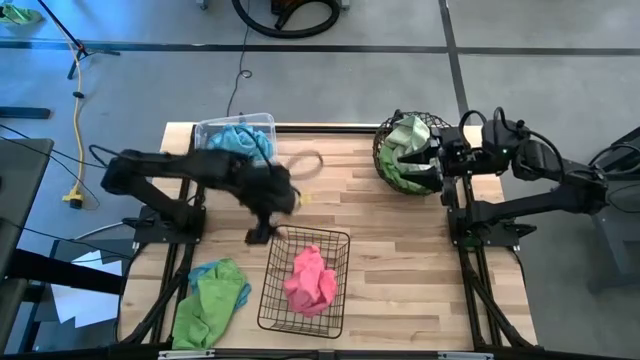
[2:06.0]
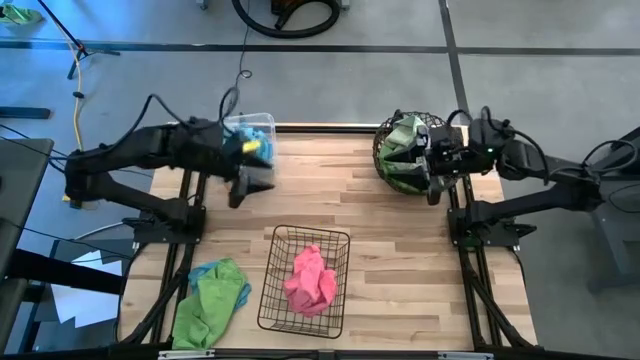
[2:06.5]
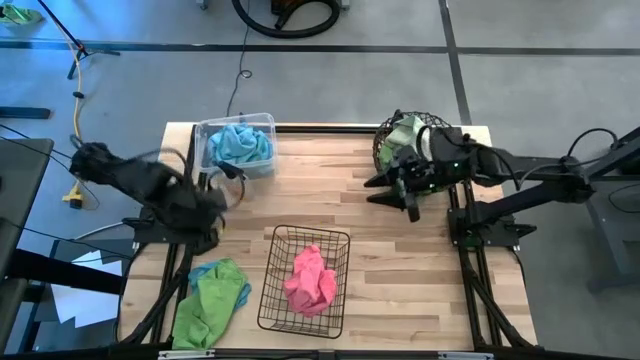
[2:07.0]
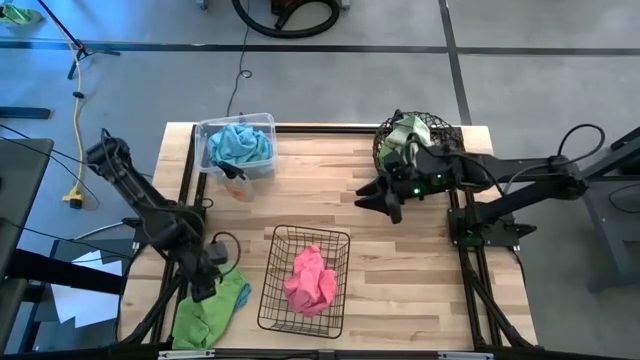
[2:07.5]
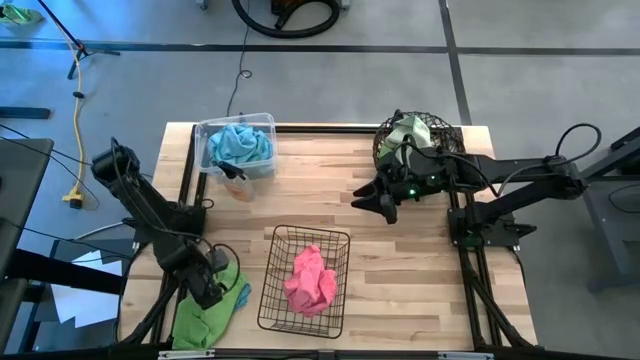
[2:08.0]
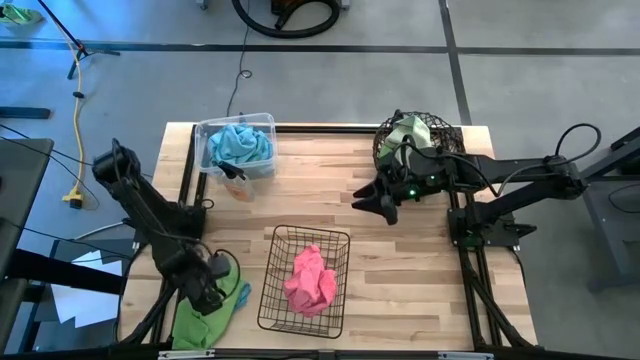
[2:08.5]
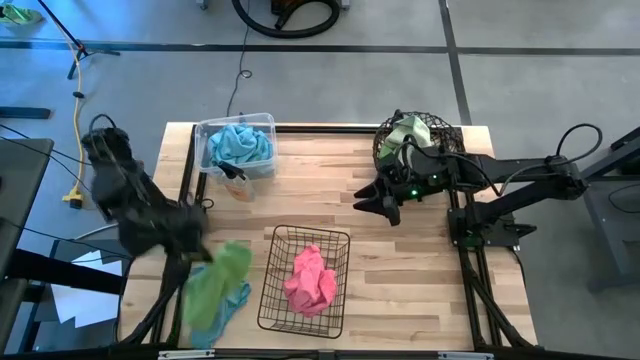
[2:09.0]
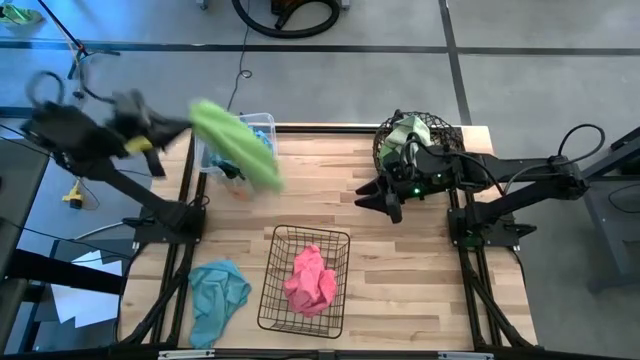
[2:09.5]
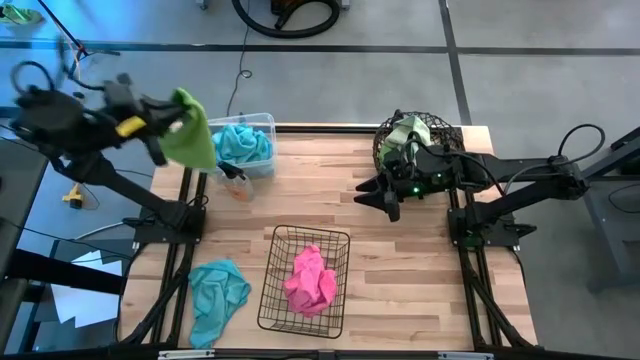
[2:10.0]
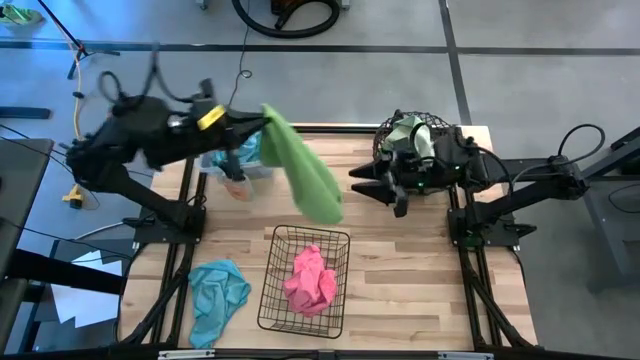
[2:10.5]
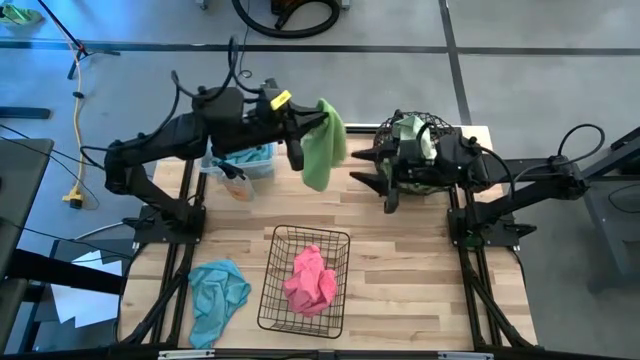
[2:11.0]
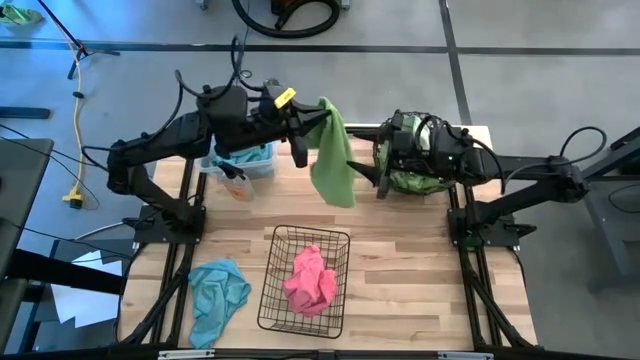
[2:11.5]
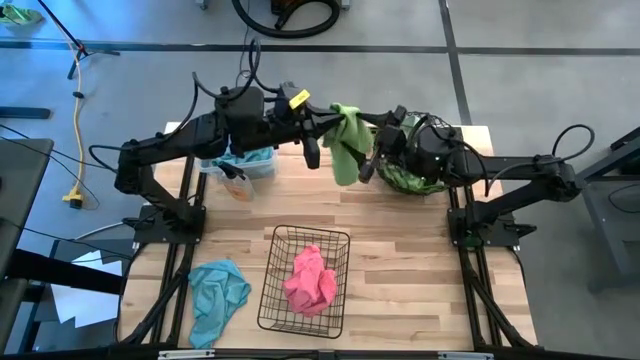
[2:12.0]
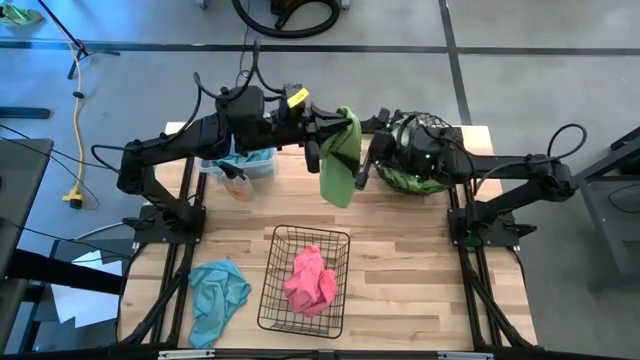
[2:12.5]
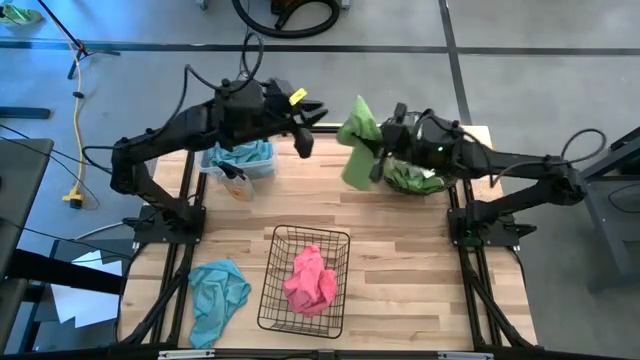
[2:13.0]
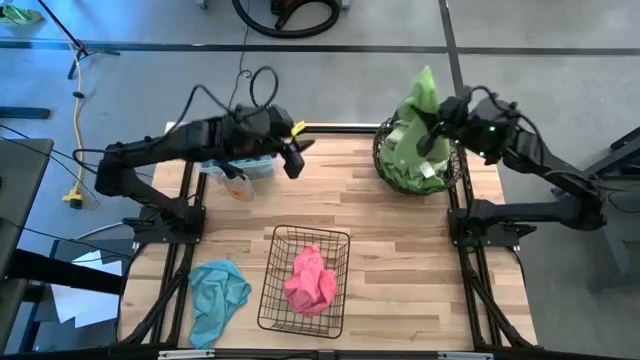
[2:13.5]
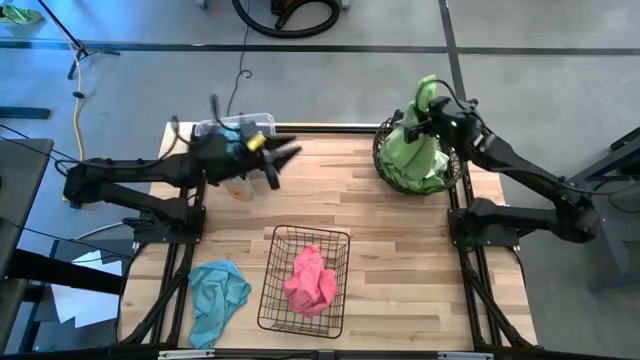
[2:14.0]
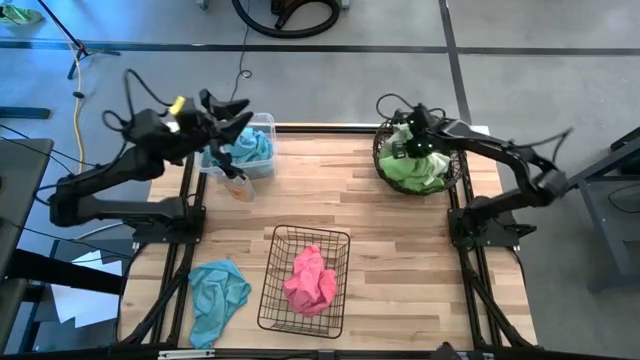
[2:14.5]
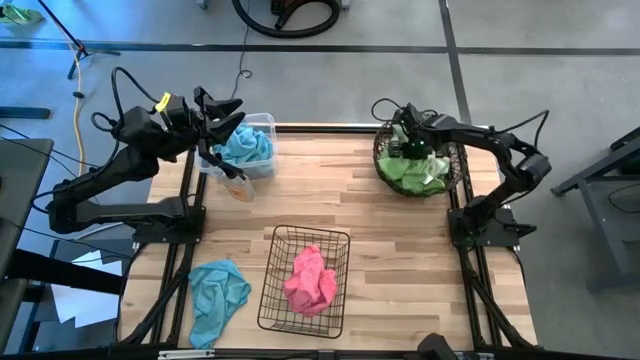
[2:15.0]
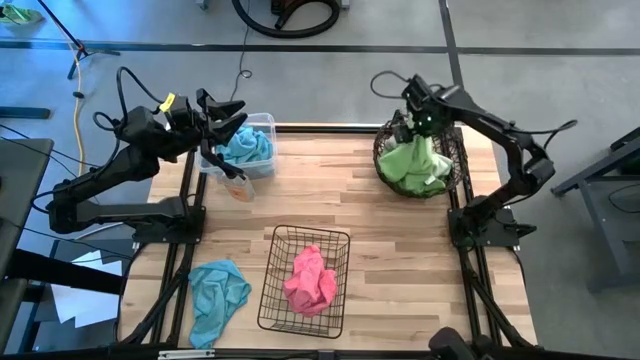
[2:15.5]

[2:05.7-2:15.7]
Task: Sort microfiber towel by color & place in baskets
Put the green microfiber towel into the round black wire basket

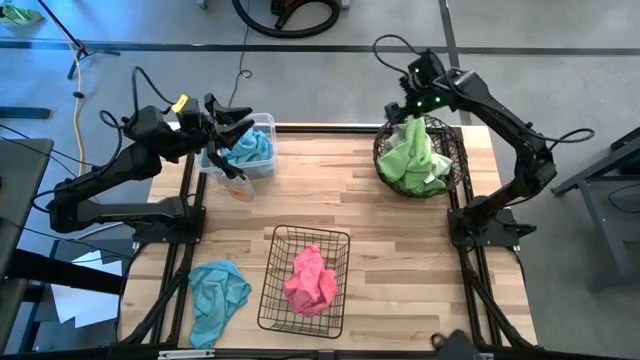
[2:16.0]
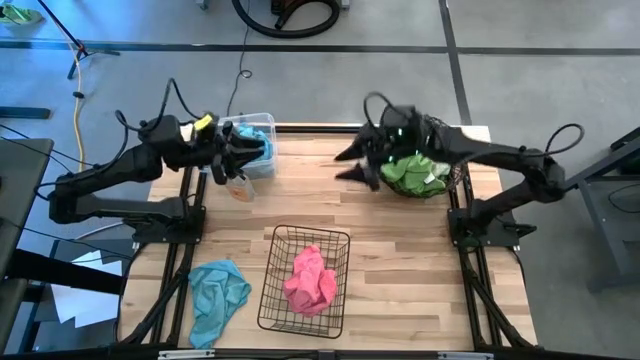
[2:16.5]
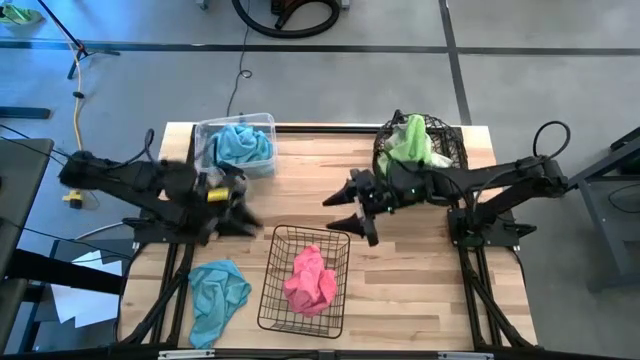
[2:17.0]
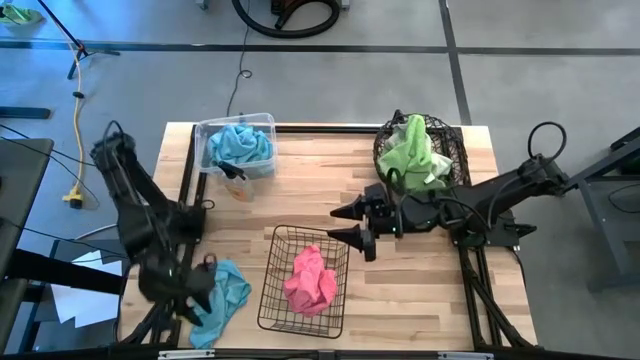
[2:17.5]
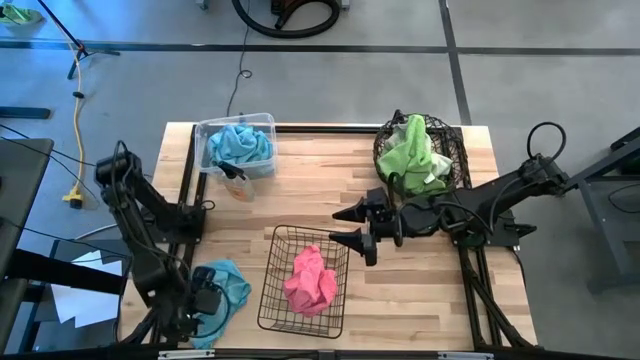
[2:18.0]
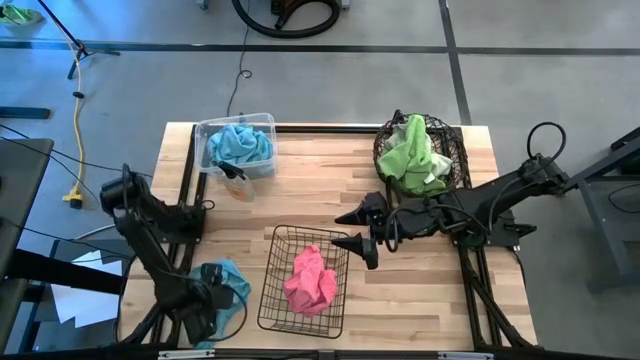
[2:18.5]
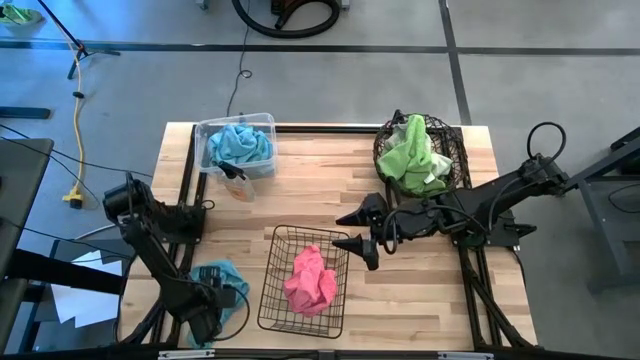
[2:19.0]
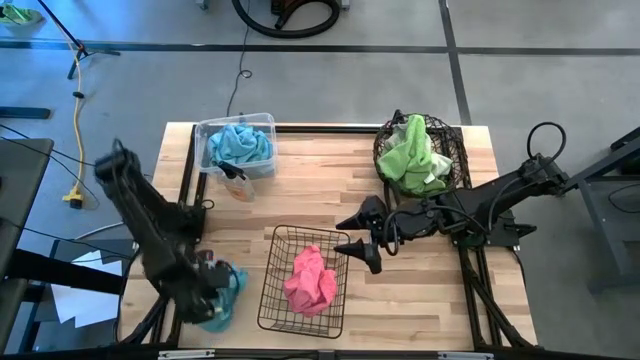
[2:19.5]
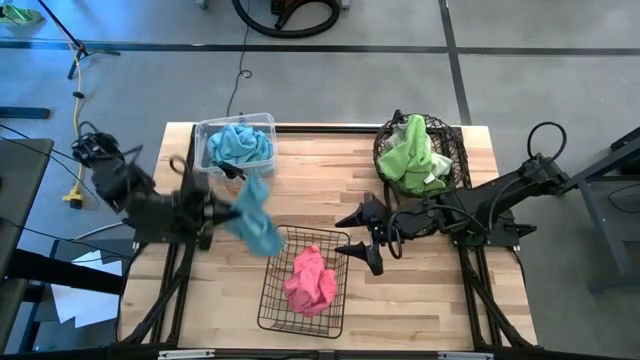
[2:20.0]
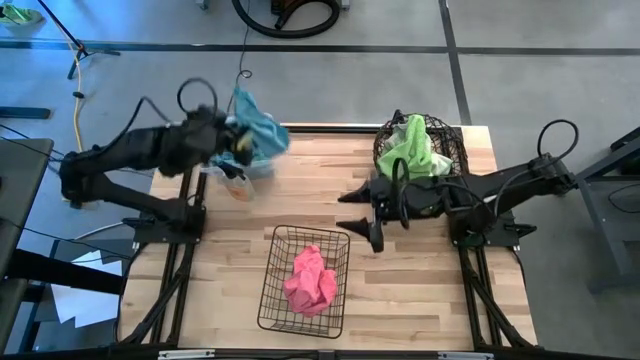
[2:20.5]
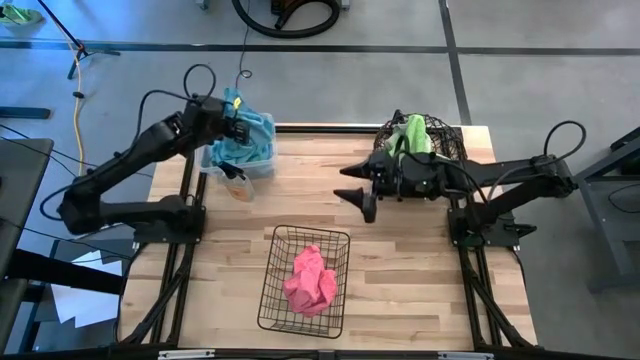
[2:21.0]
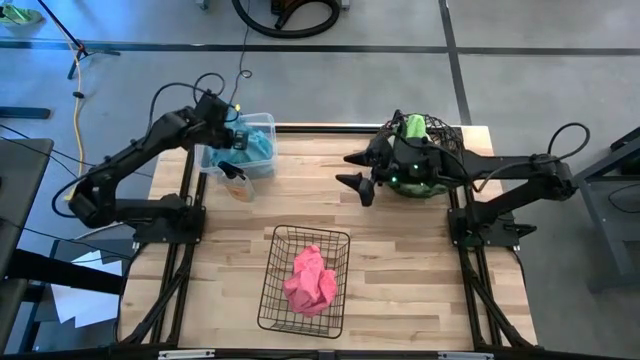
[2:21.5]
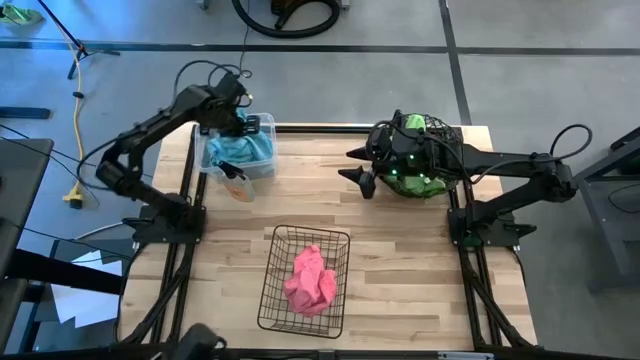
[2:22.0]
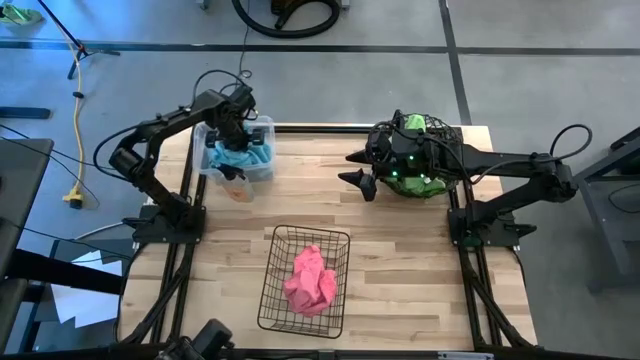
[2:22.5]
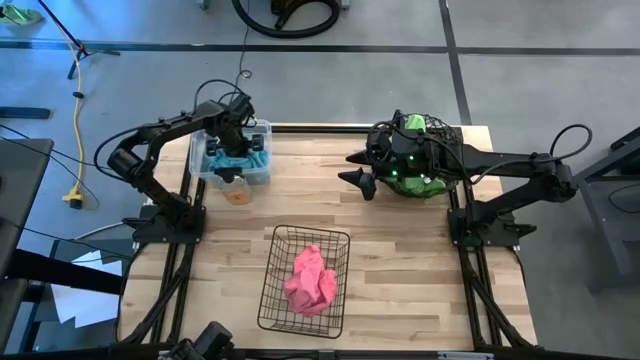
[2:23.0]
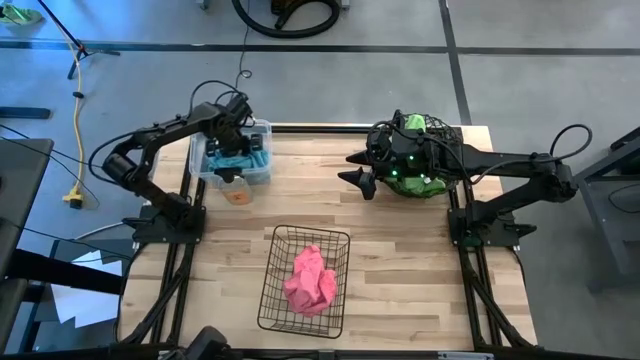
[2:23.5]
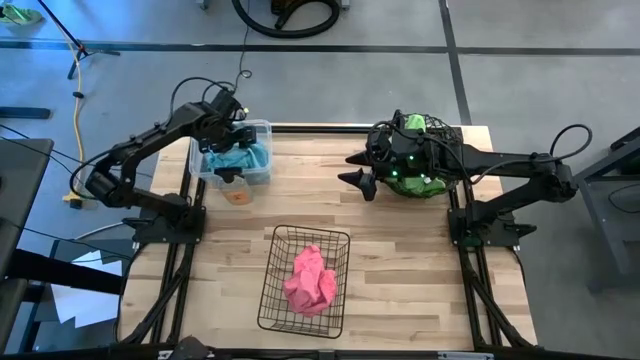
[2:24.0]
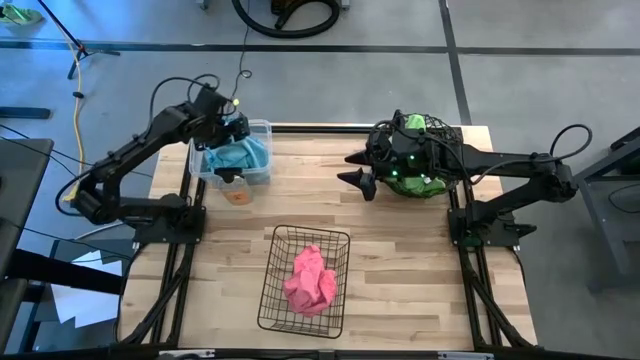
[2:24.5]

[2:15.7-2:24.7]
Put the blue microfiber towel into the transparent bin
